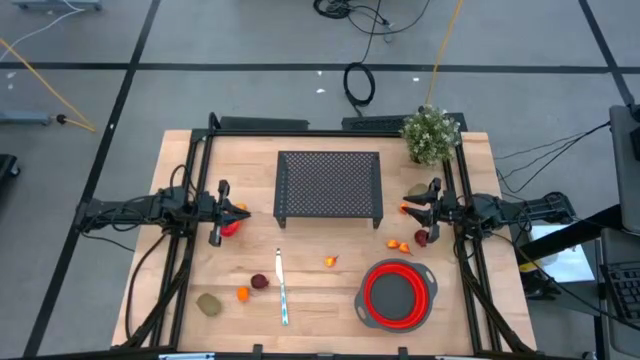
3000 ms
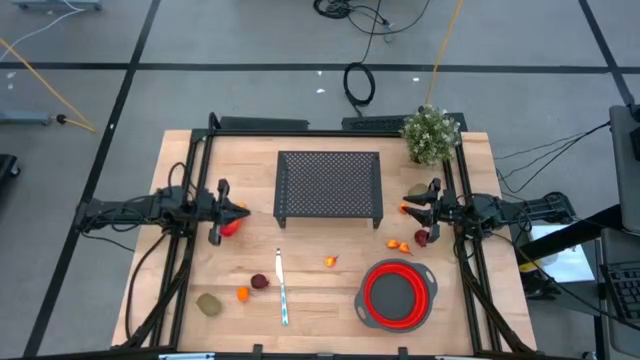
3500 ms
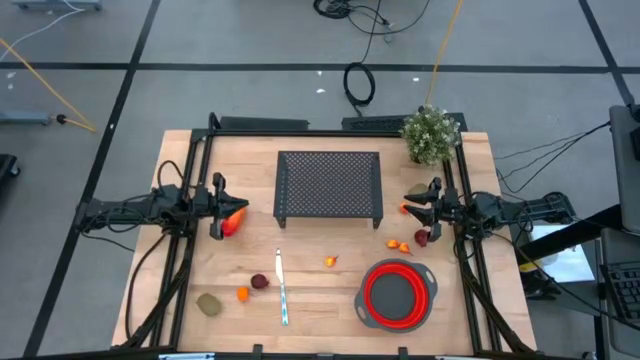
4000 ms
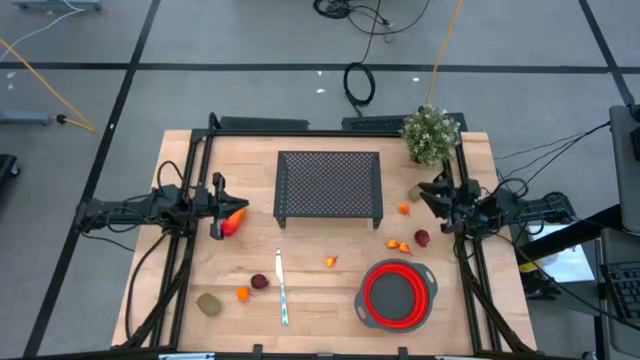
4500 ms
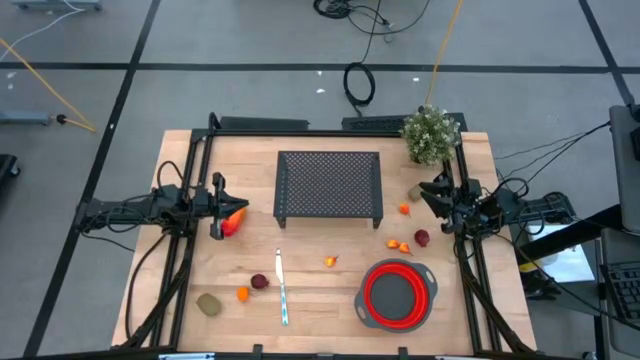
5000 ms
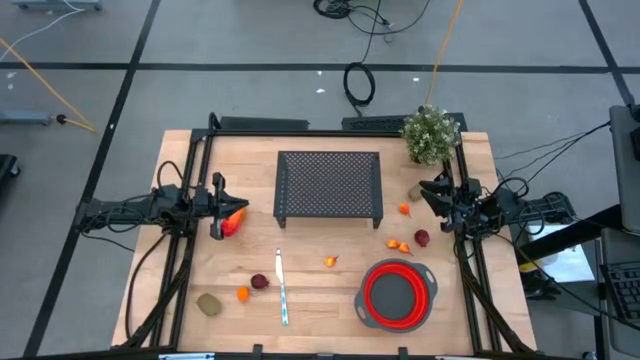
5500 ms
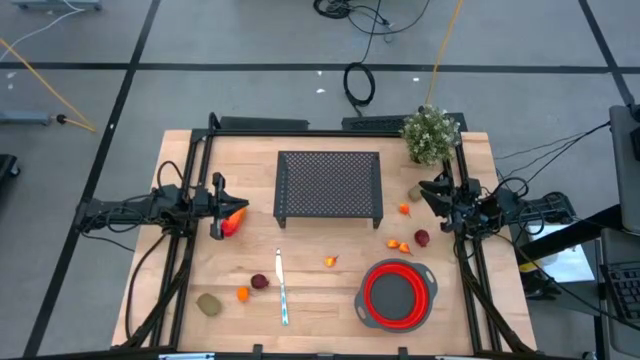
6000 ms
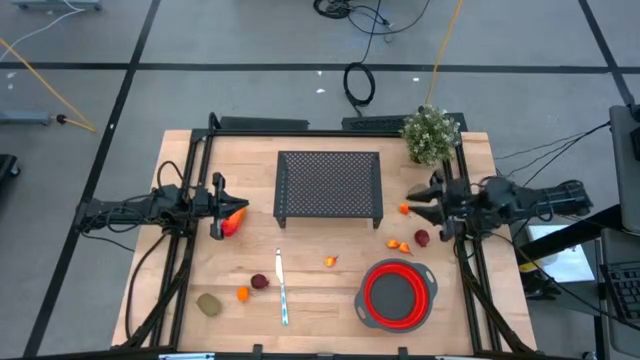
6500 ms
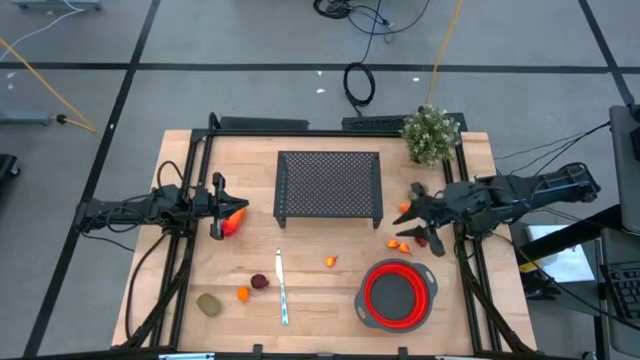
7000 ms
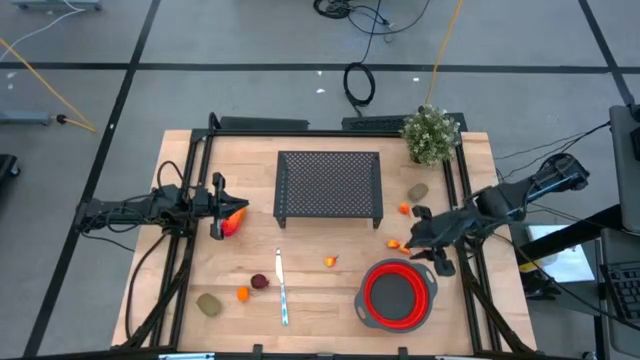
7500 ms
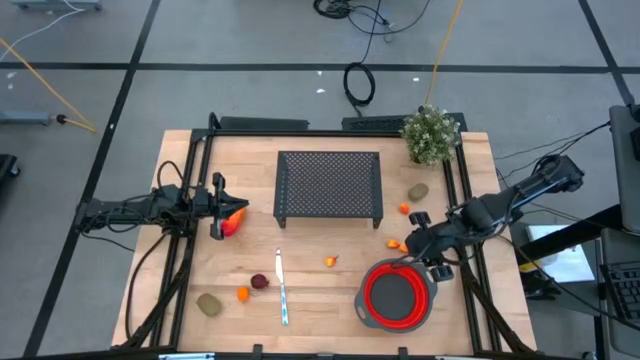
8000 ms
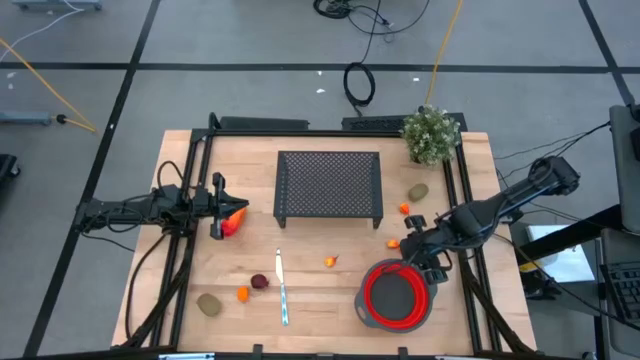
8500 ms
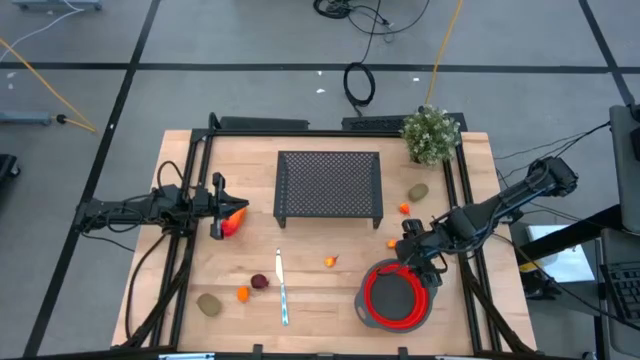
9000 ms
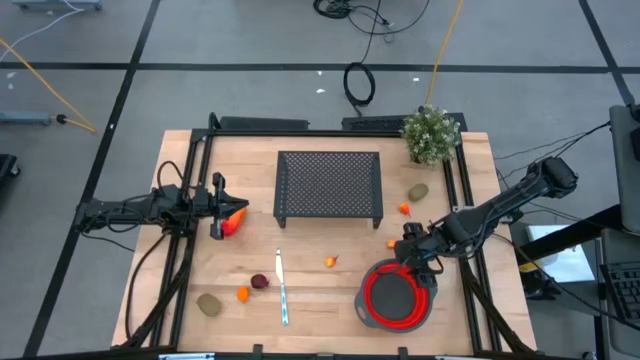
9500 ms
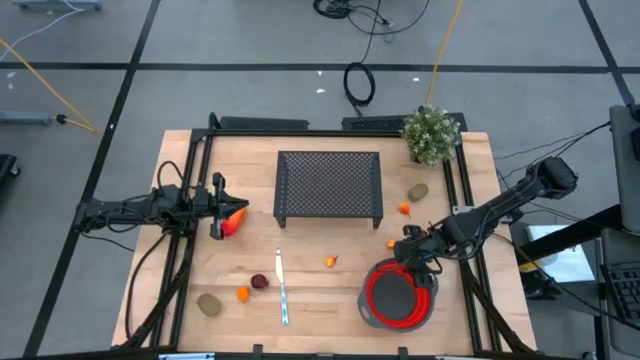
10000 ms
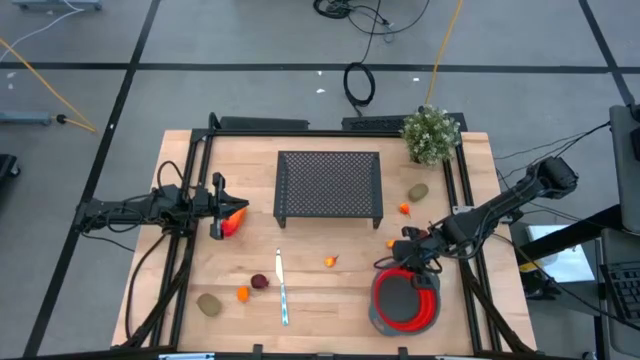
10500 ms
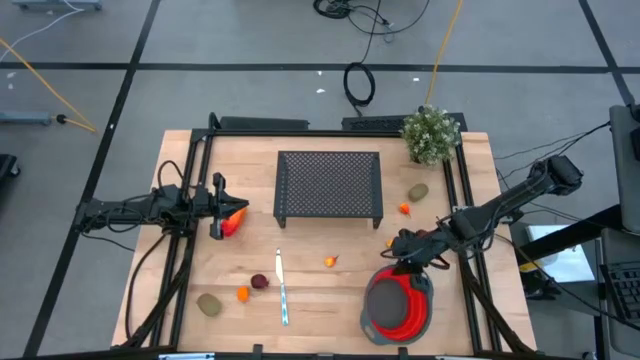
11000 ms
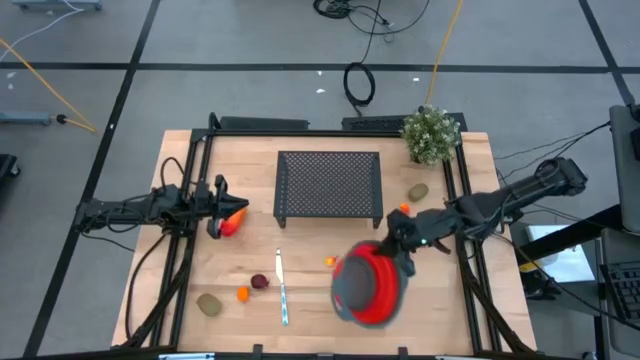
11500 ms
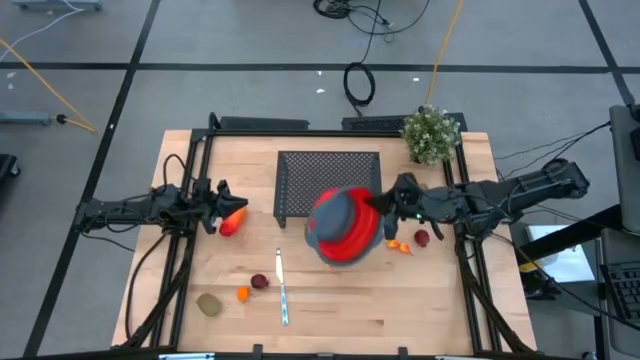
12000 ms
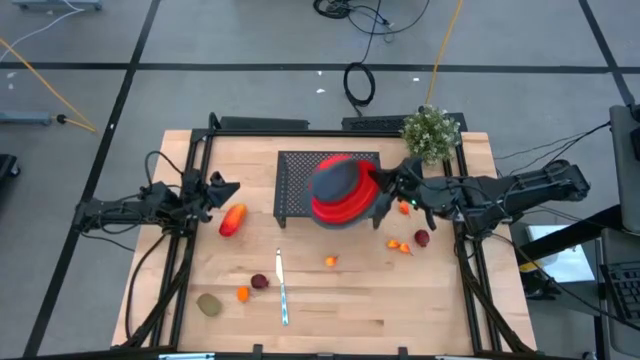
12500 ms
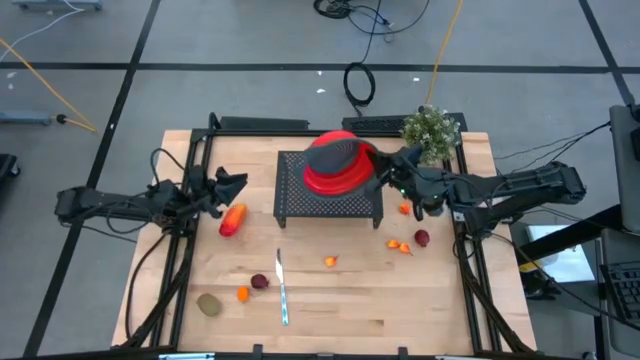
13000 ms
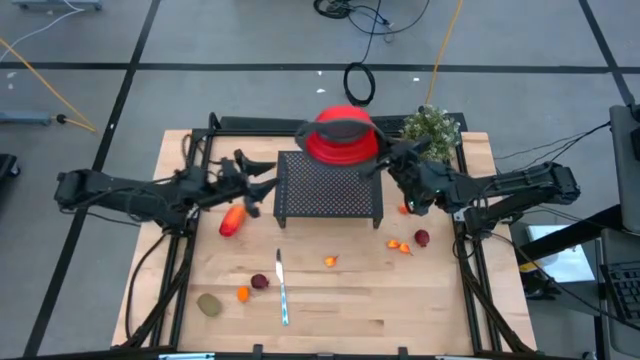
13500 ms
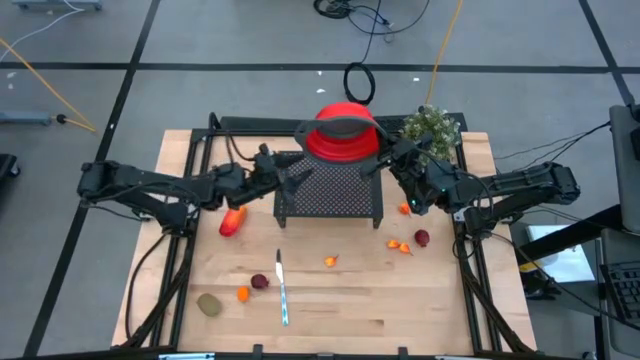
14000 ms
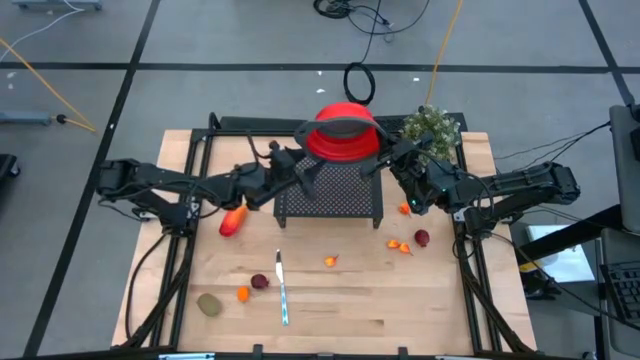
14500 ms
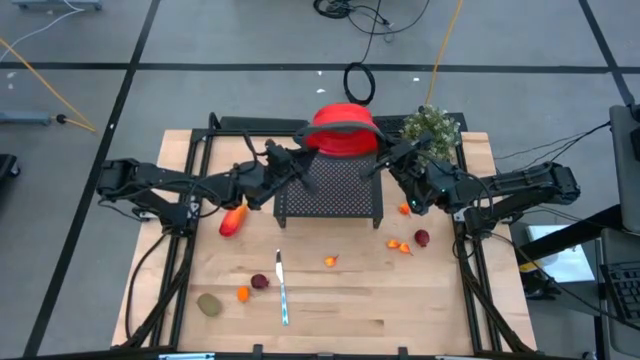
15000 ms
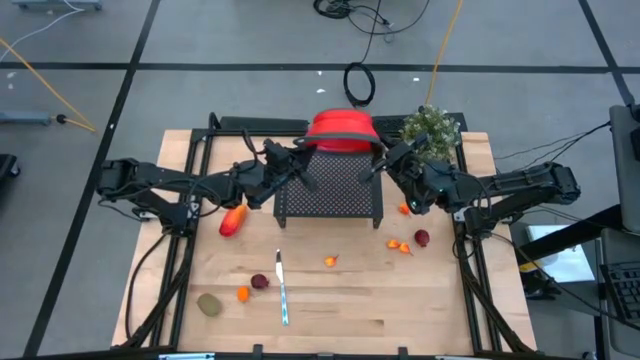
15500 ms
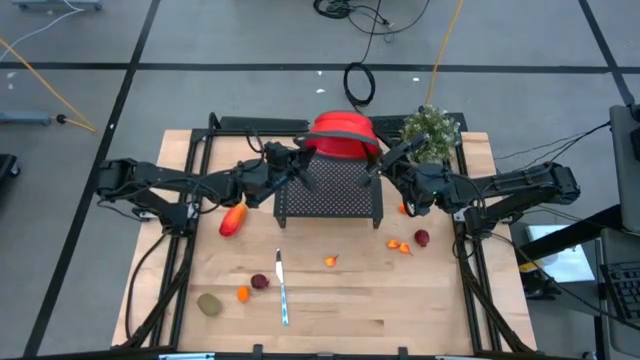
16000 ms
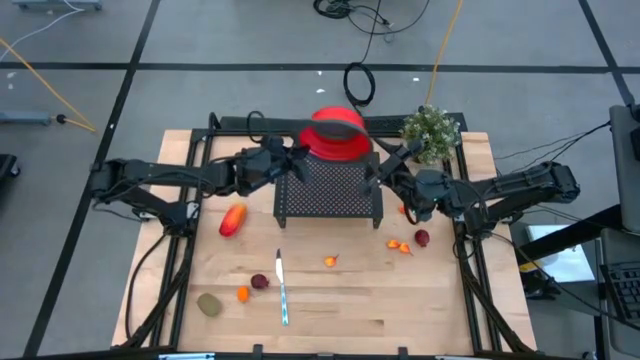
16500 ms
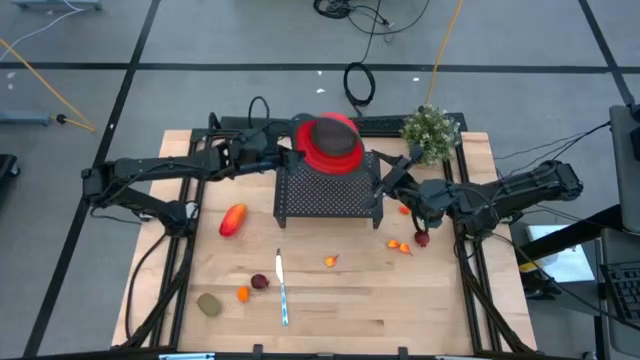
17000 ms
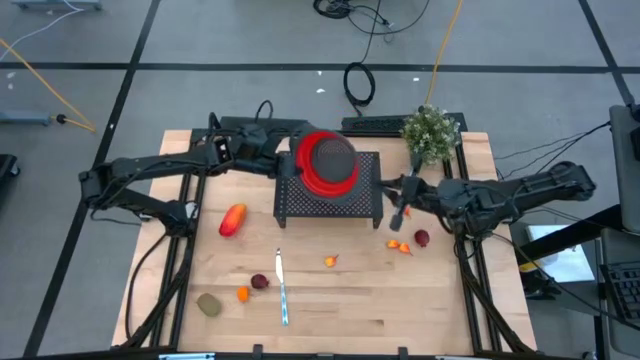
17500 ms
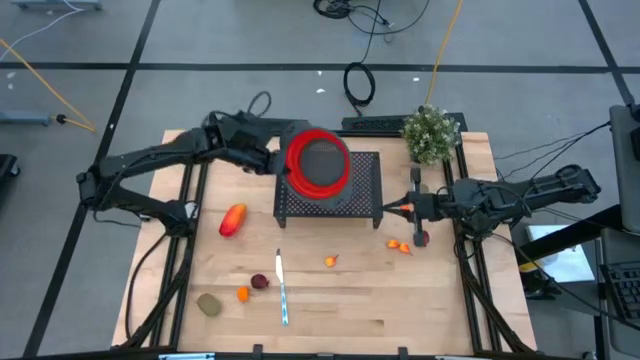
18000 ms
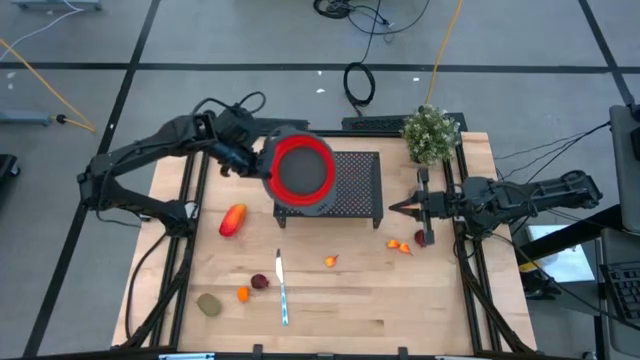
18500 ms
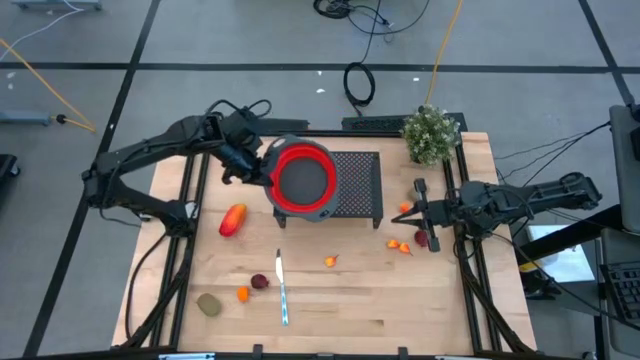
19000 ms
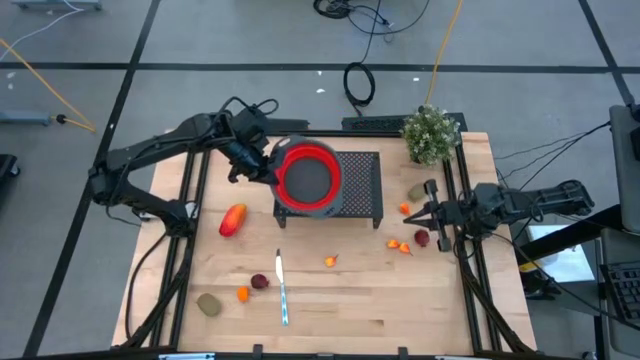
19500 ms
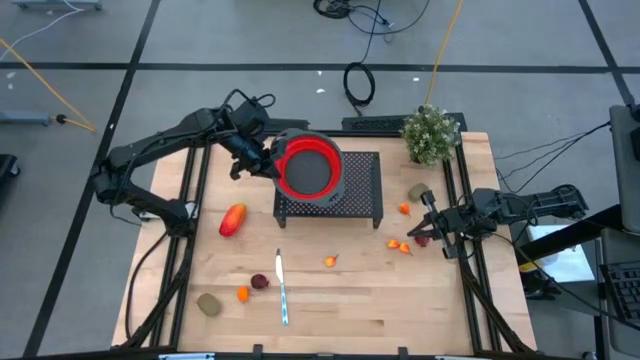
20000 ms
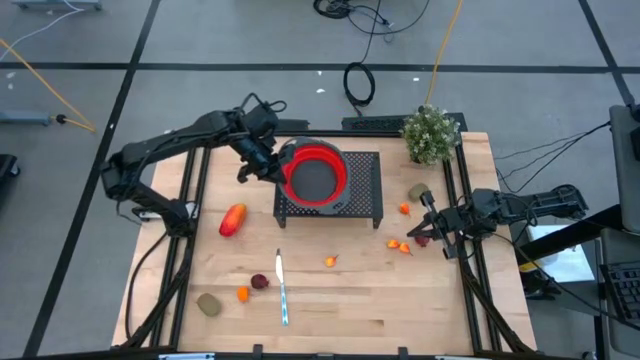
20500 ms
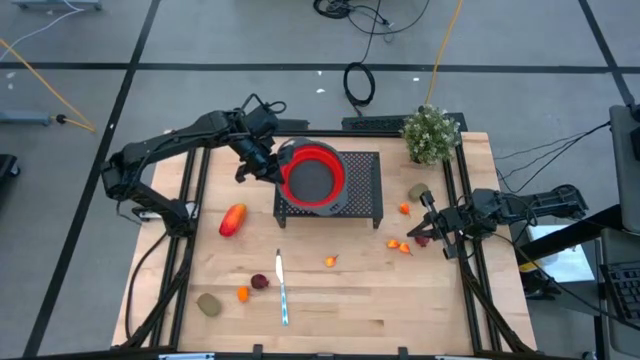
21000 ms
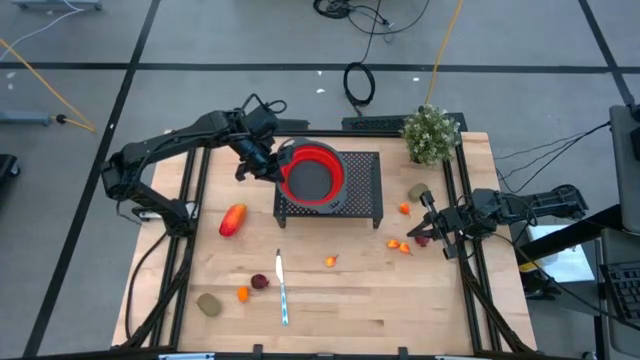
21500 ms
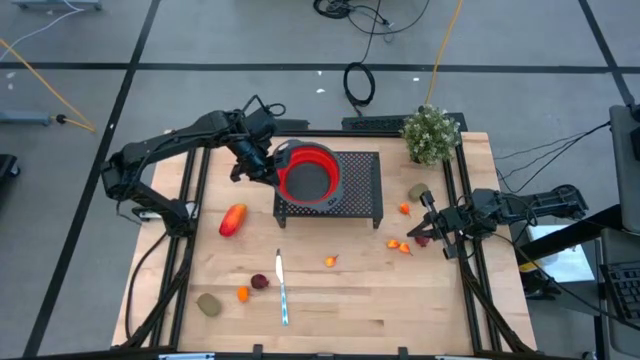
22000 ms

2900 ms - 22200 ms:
Task: Pick & Place Fruit
Put the strainer on the shelf
